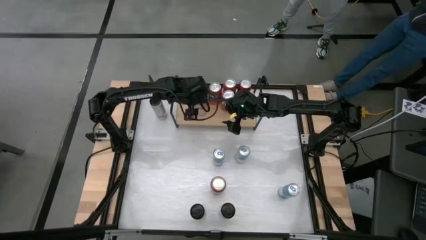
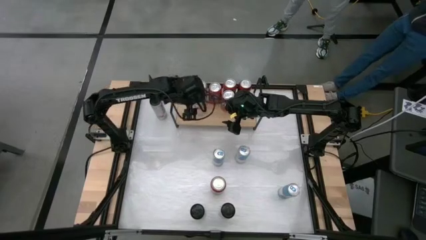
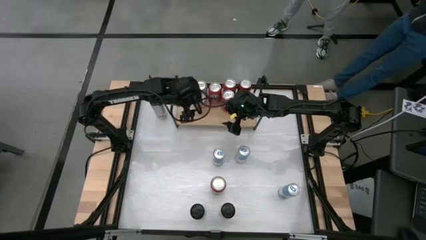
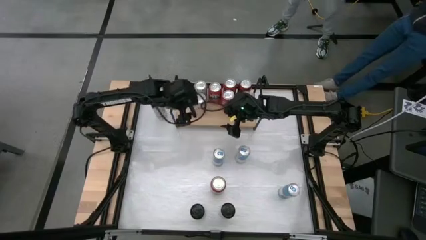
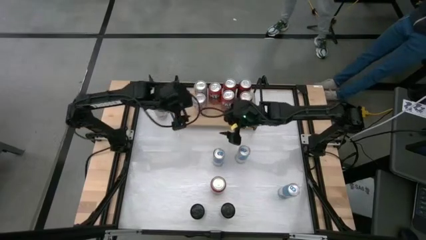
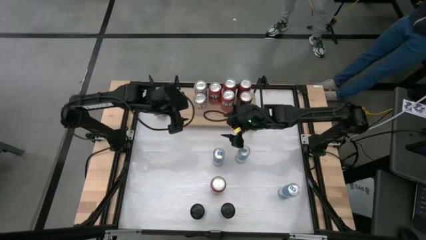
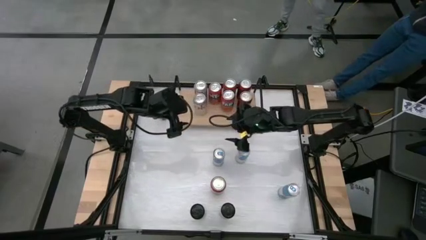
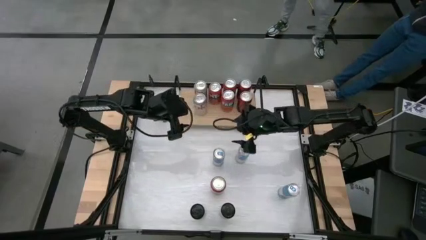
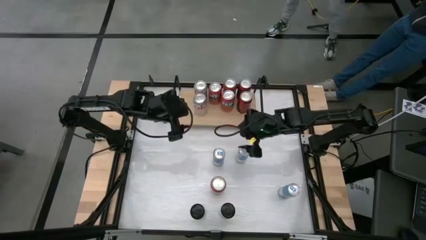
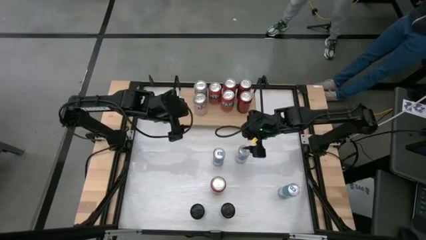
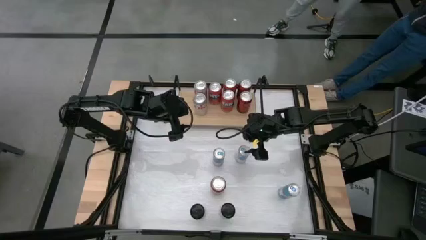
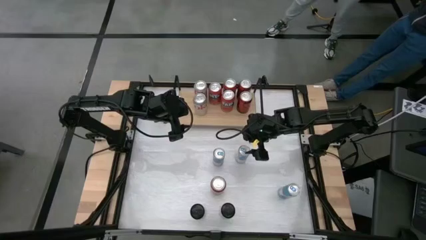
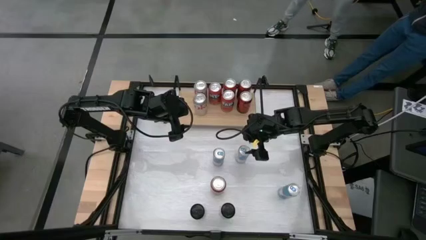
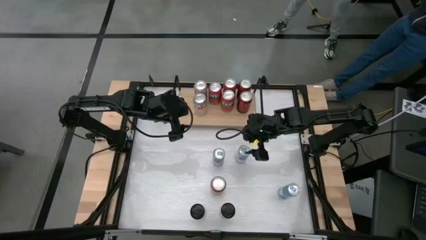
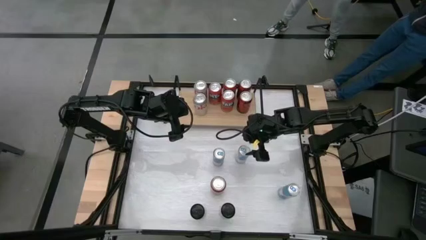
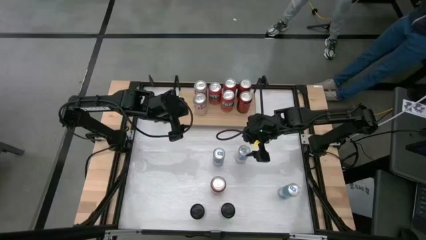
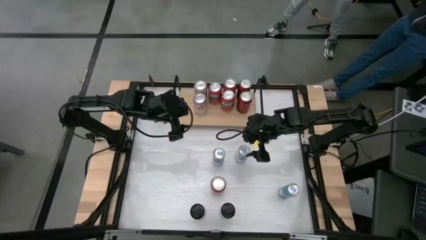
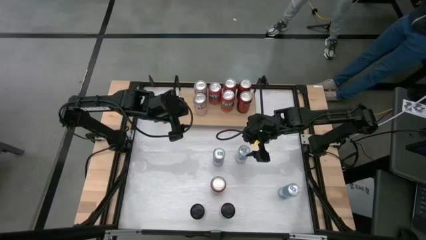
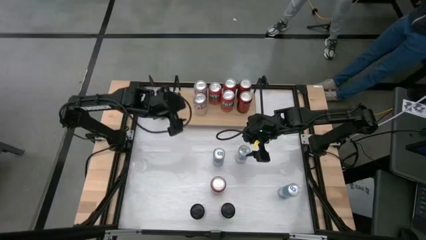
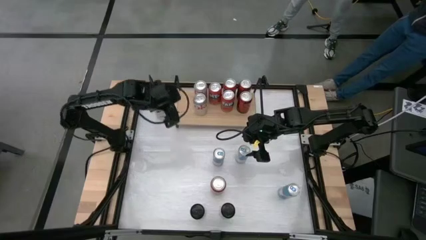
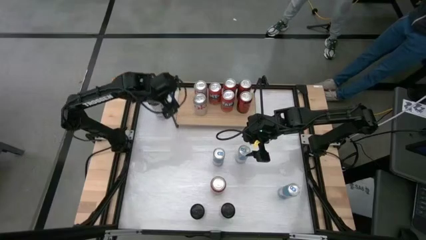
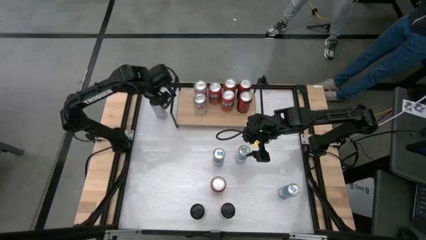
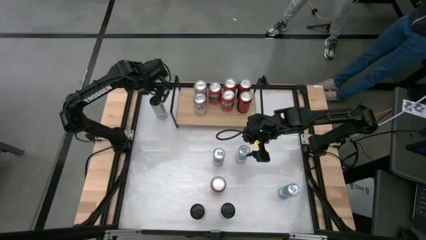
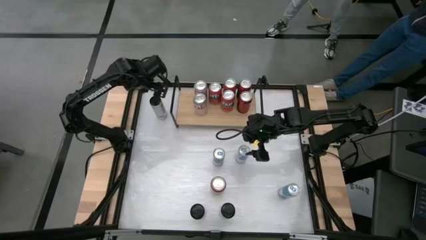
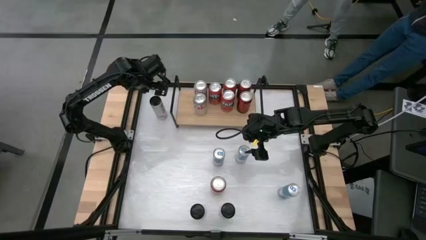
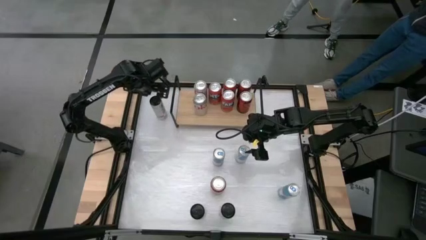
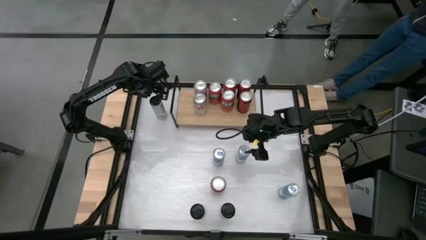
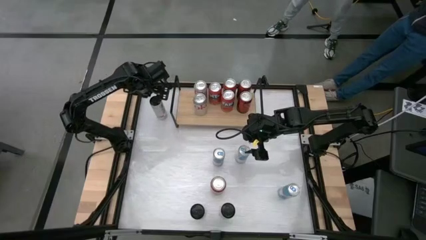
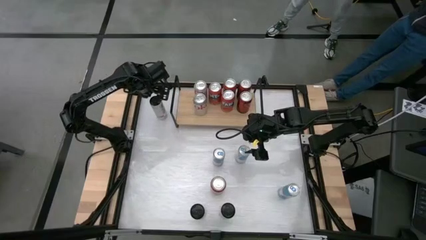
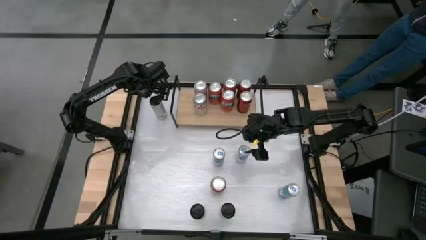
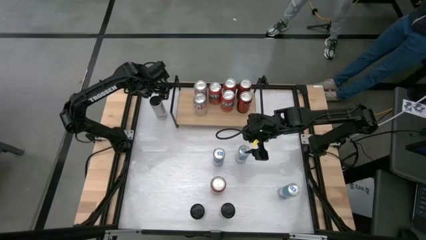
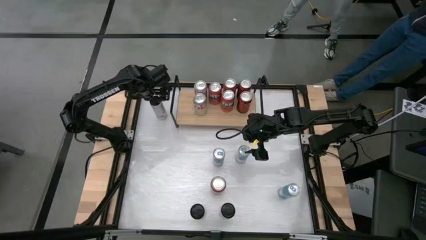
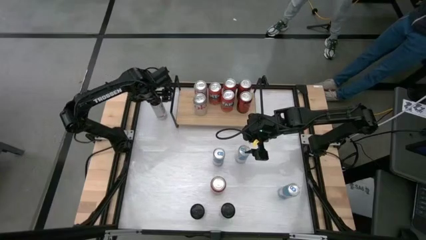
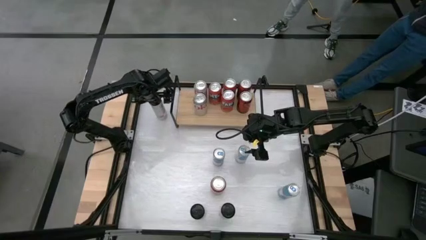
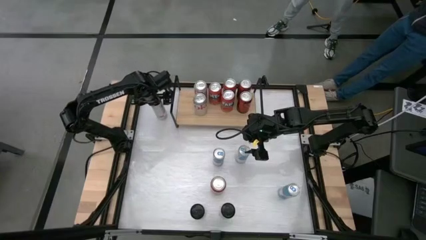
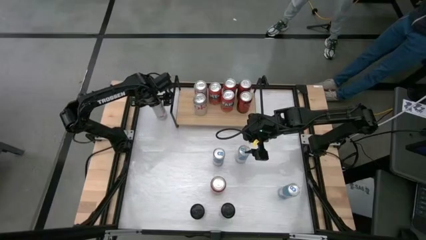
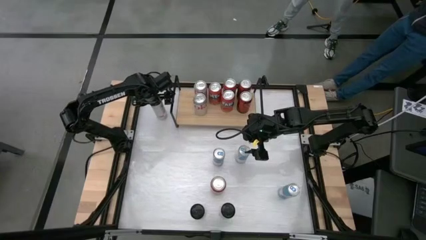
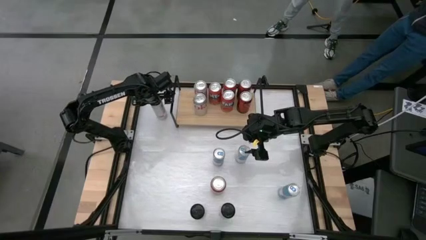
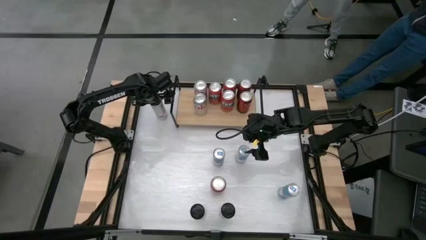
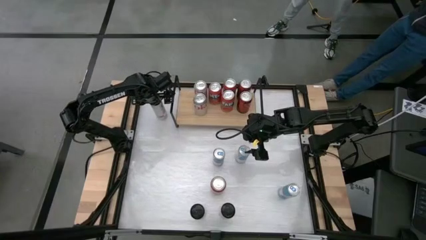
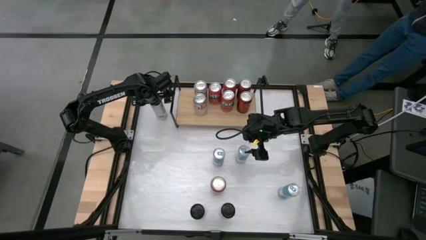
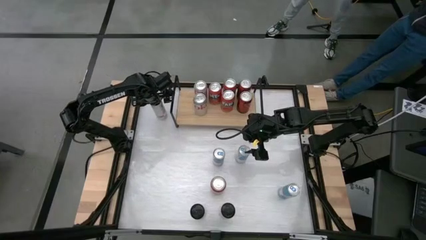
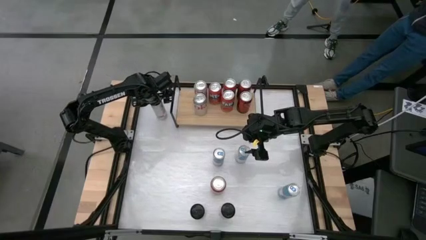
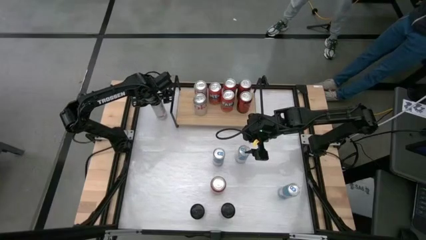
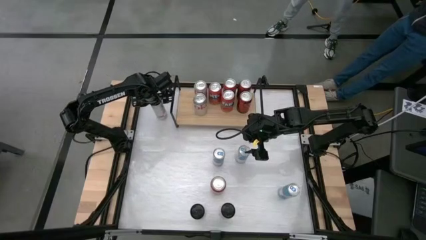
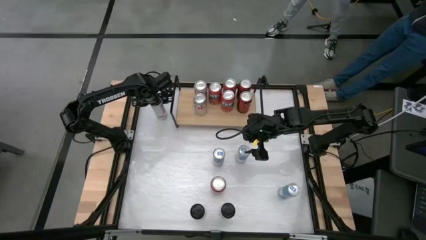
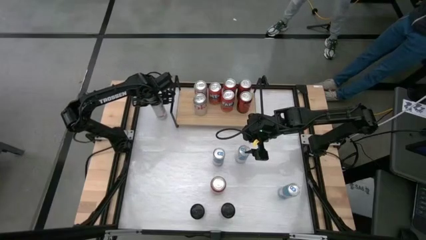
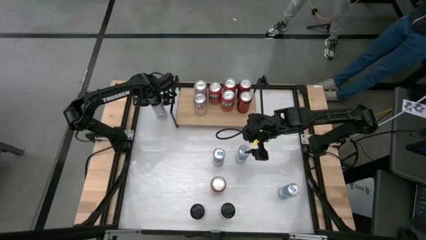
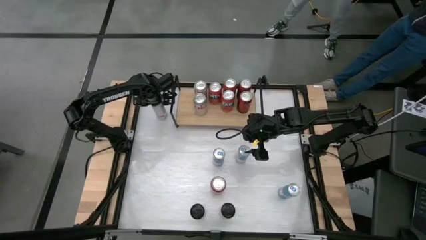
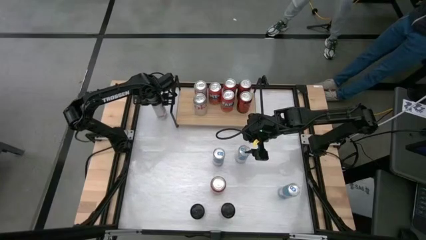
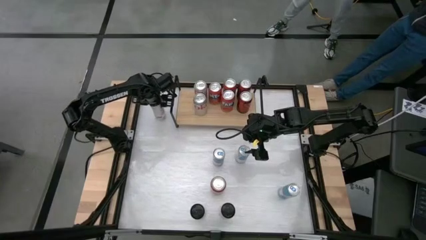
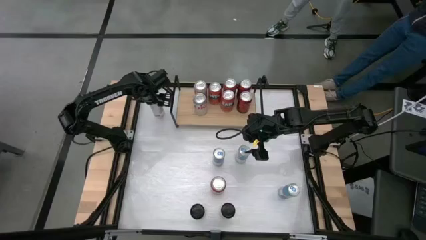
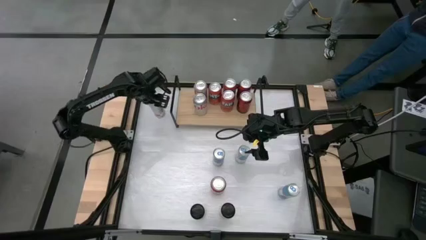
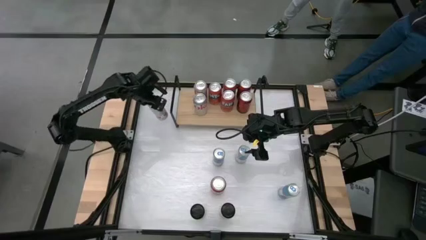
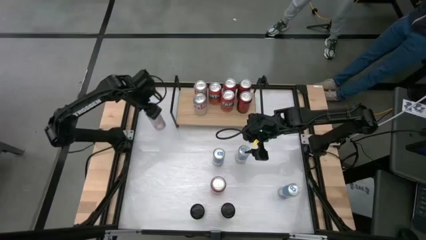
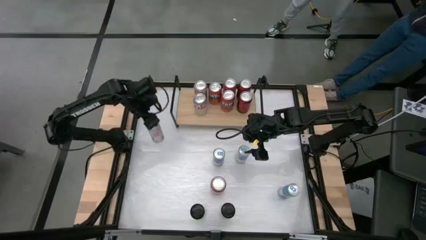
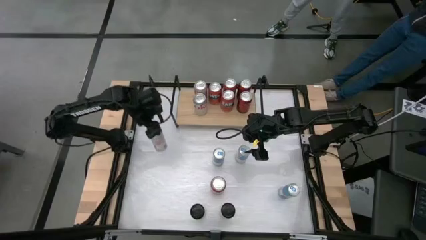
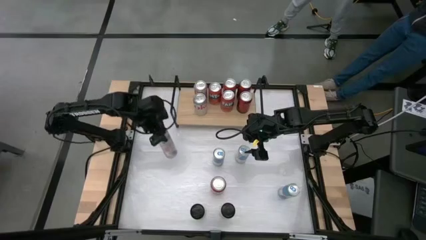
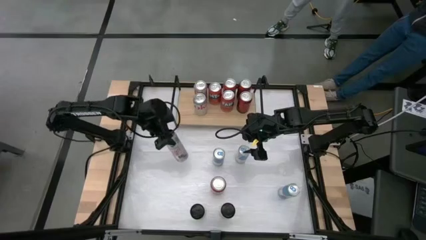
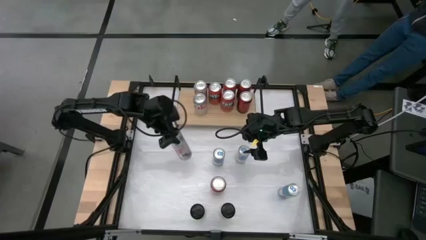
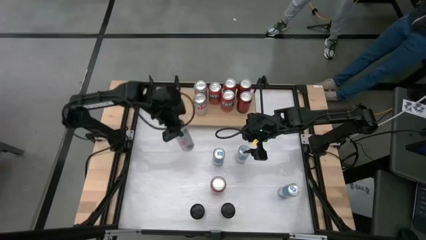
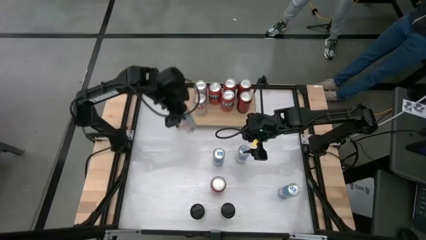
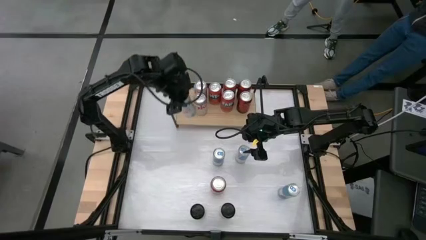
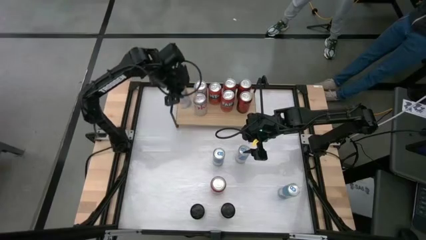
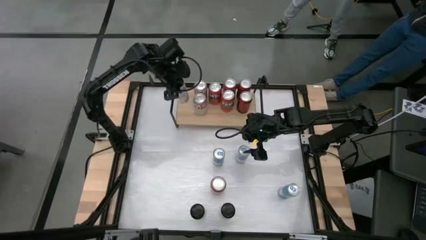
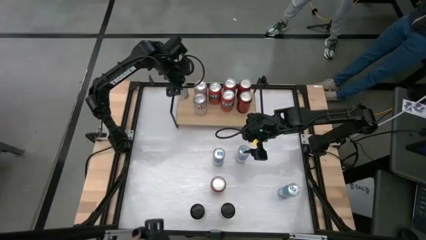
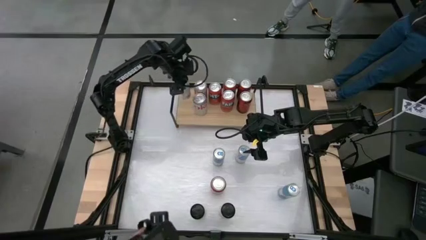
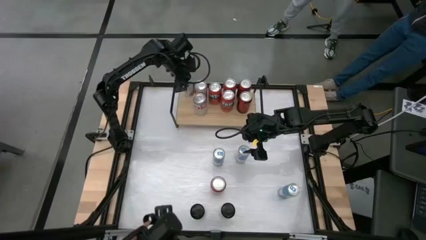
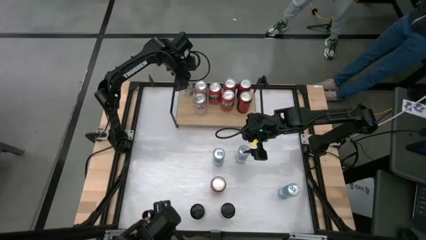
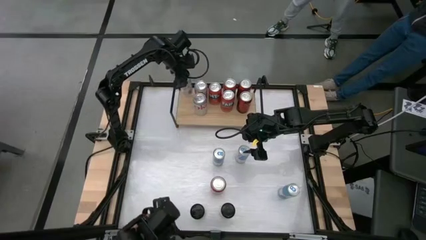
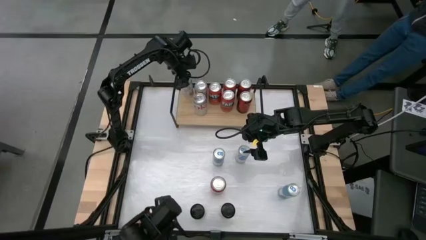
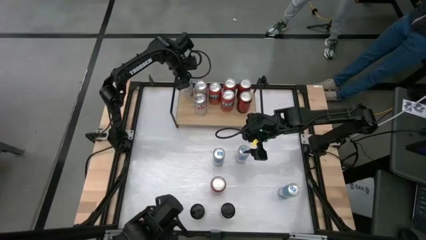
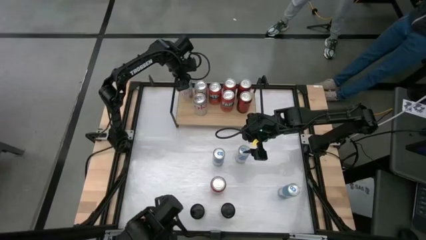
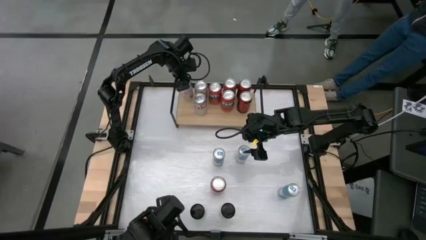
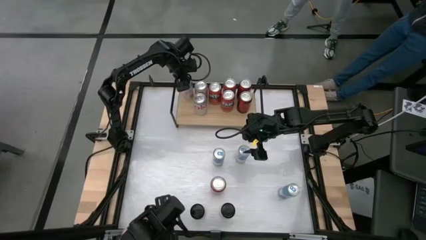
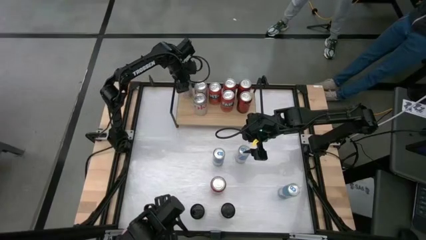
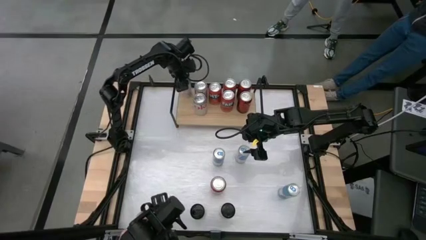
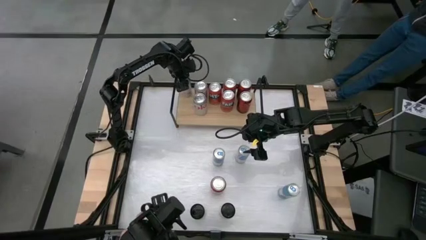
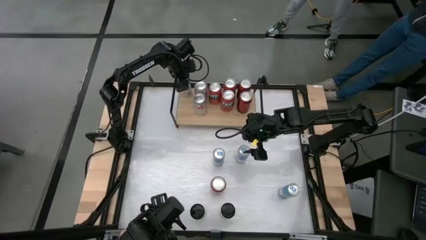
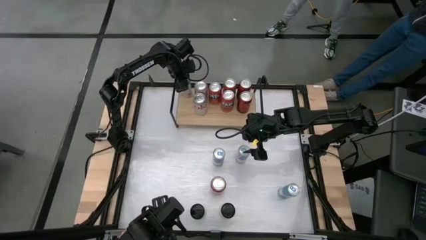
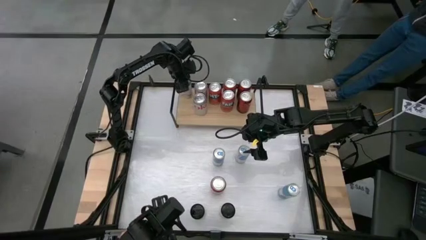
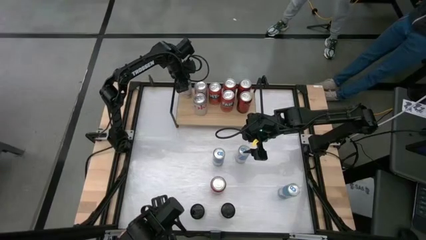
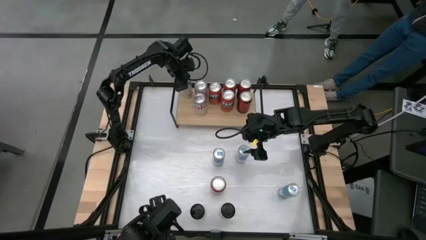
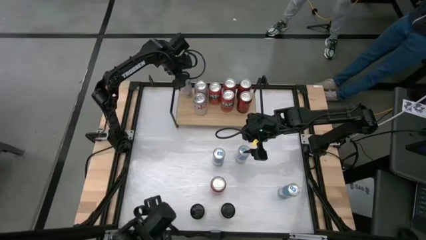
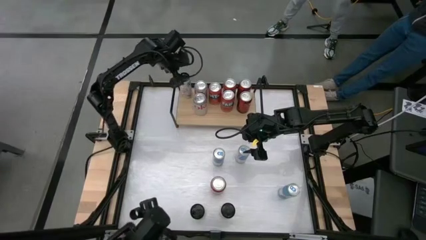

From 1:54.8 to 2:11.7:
Task: Place canned beverage on shelf
Put the white and pink soda can on the shelf
